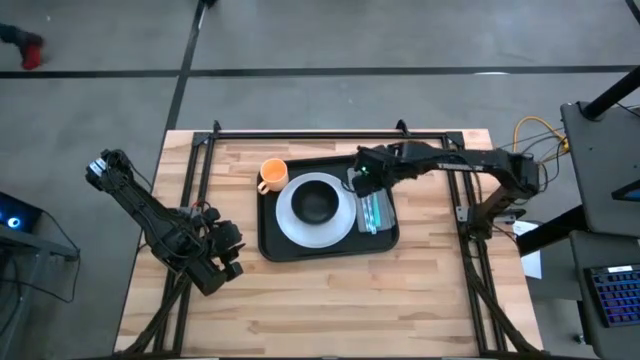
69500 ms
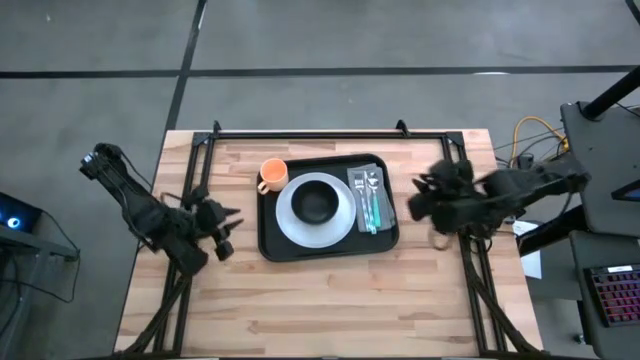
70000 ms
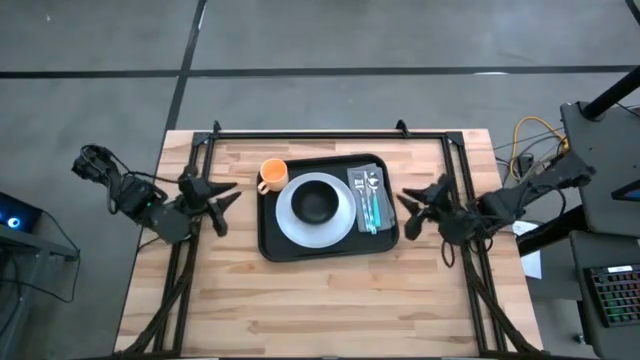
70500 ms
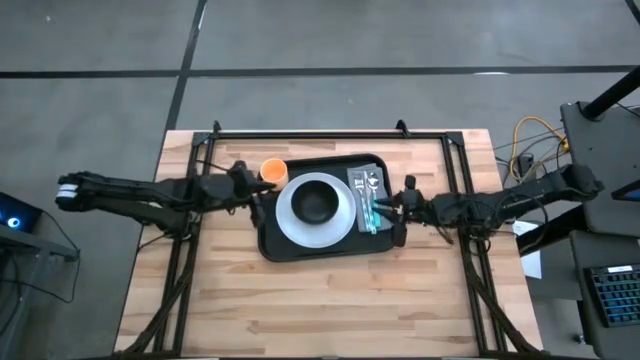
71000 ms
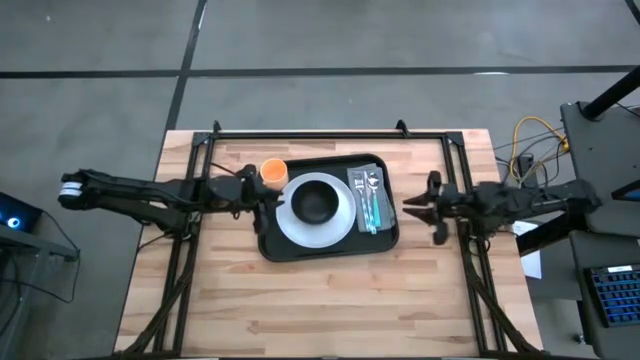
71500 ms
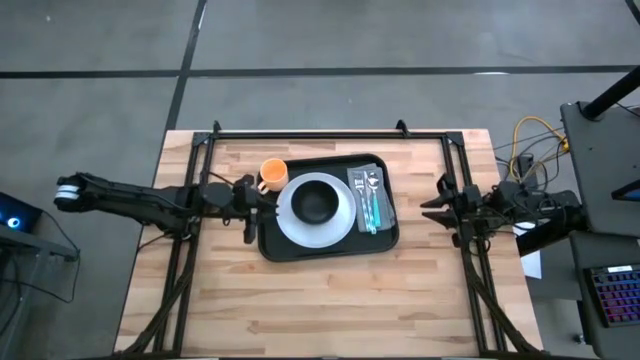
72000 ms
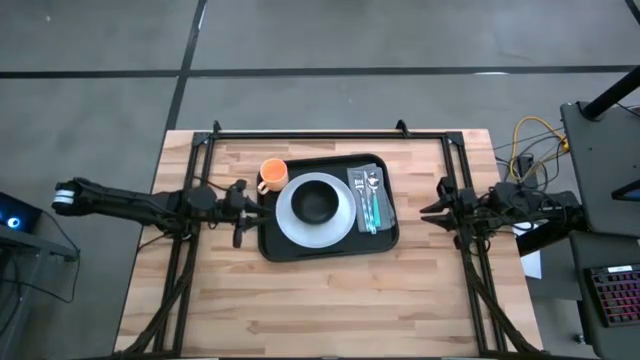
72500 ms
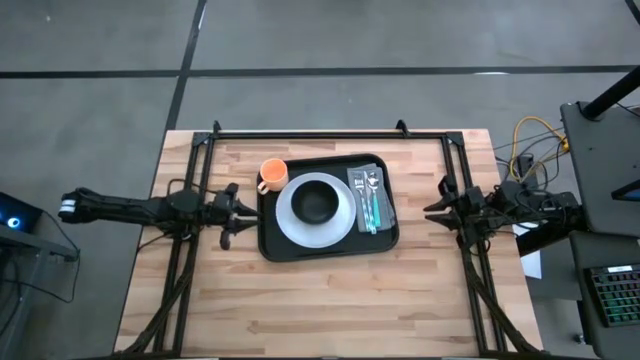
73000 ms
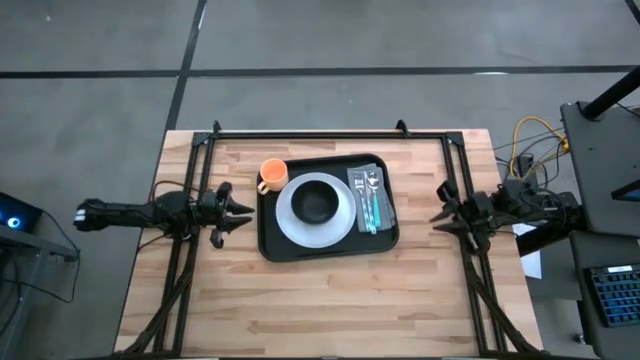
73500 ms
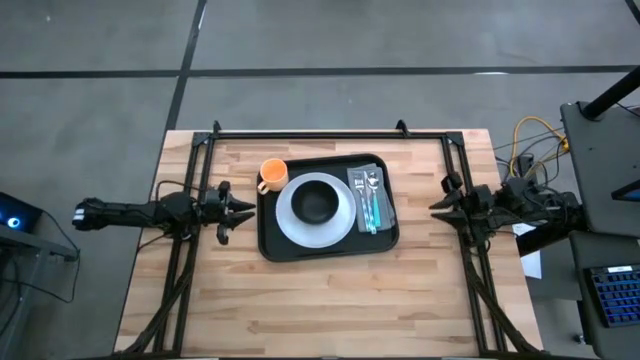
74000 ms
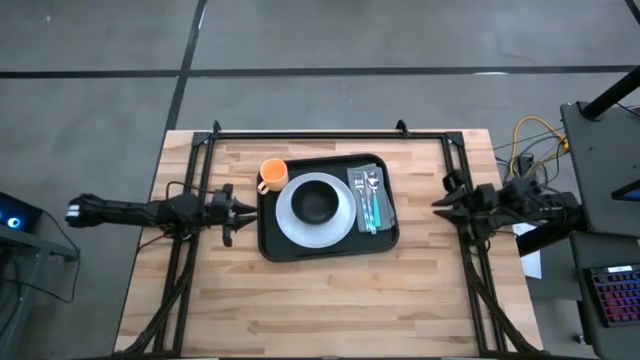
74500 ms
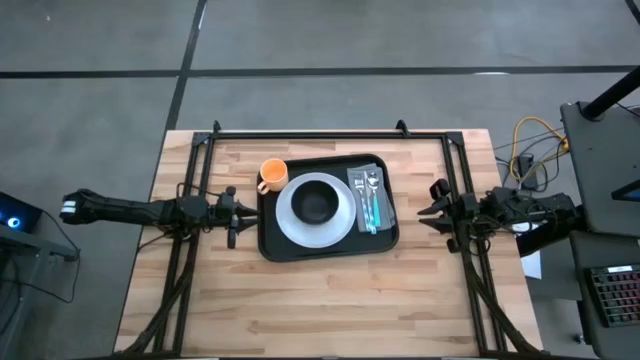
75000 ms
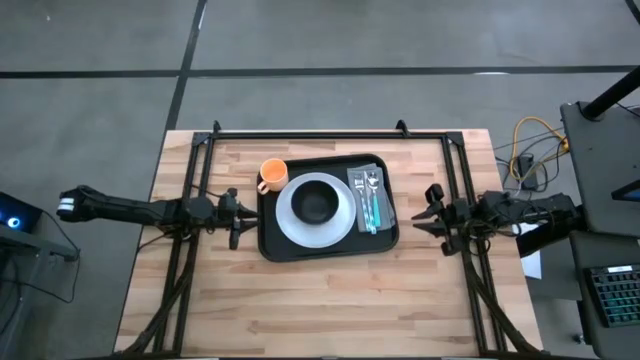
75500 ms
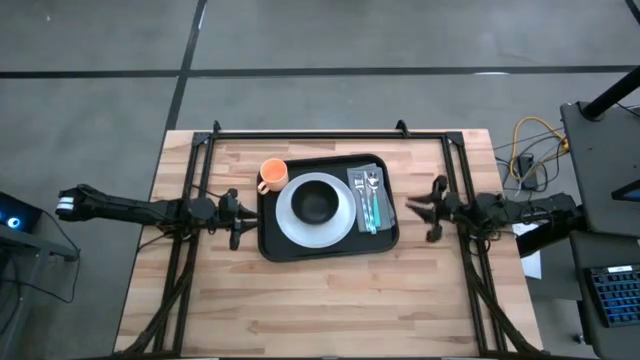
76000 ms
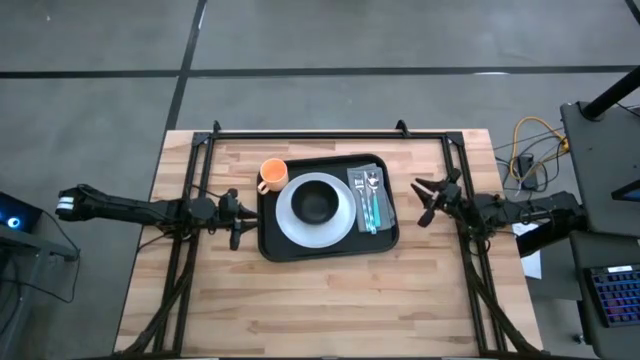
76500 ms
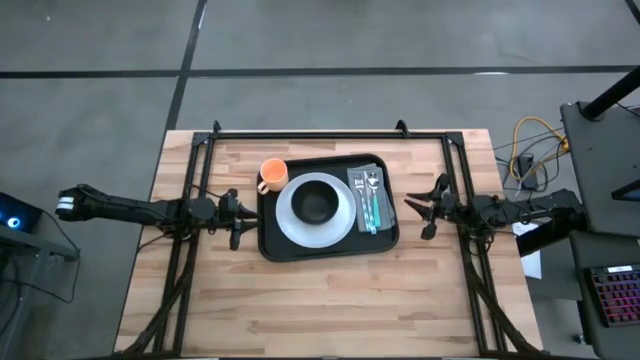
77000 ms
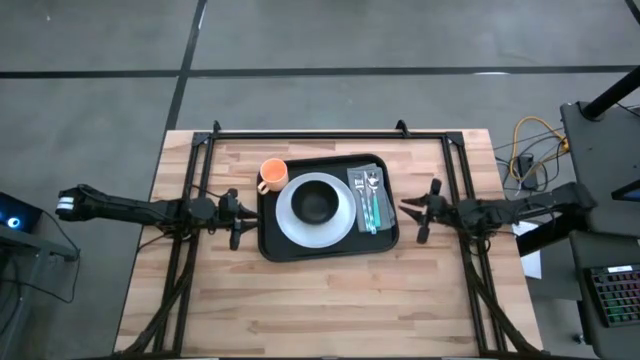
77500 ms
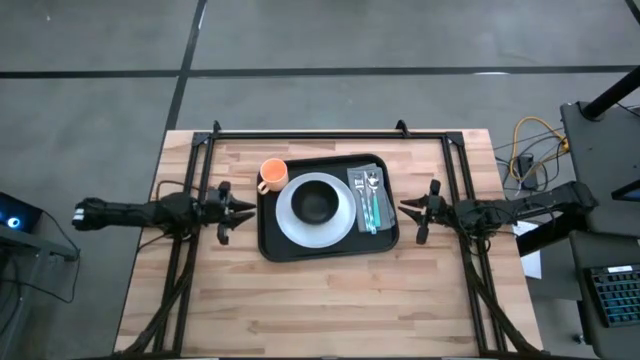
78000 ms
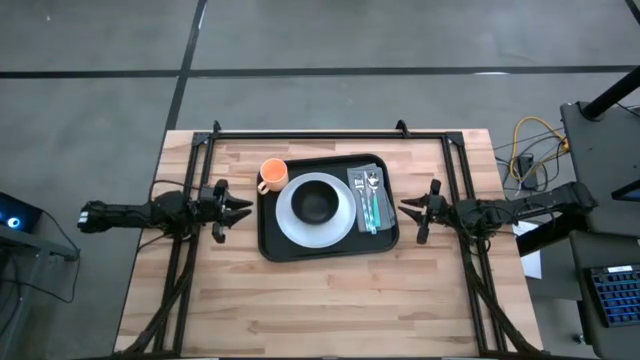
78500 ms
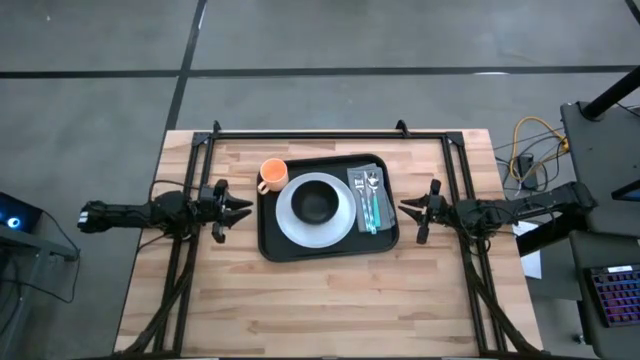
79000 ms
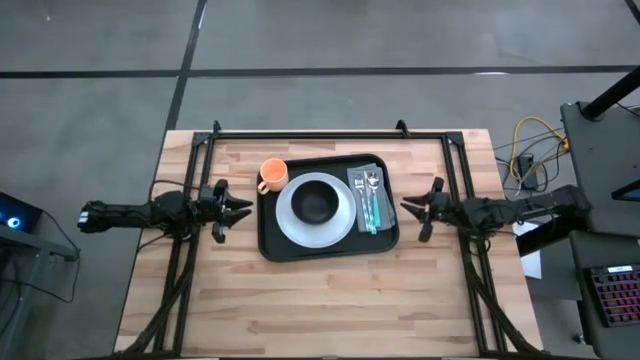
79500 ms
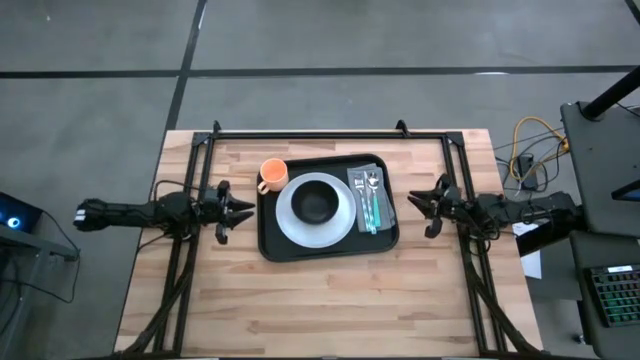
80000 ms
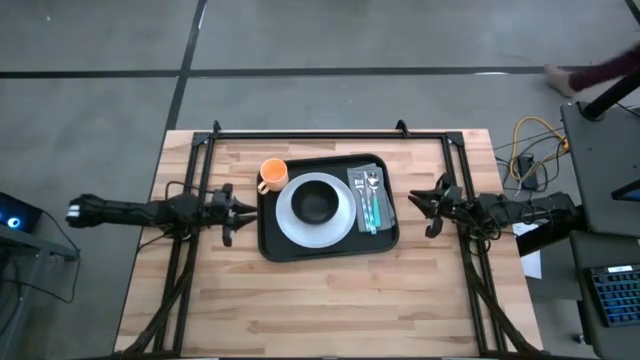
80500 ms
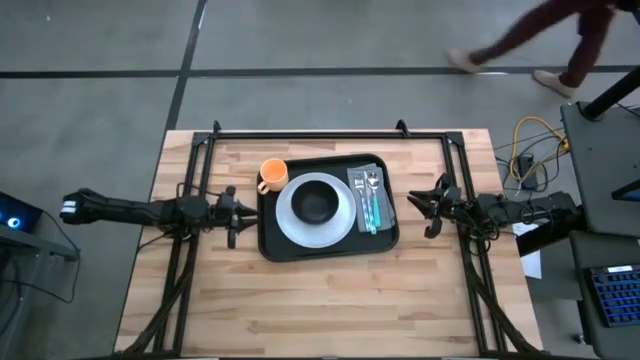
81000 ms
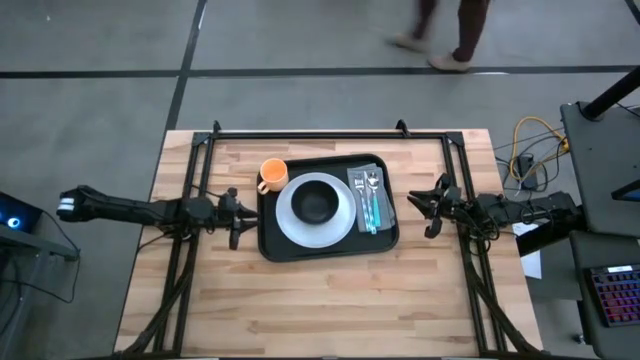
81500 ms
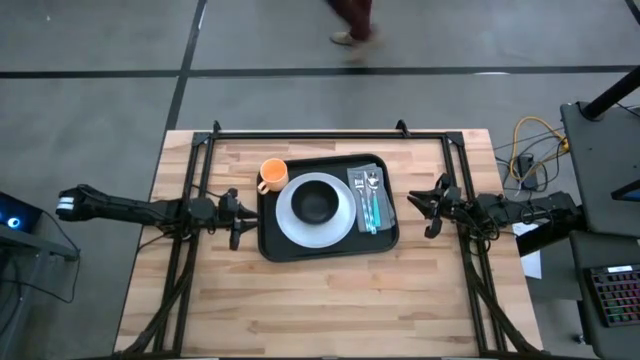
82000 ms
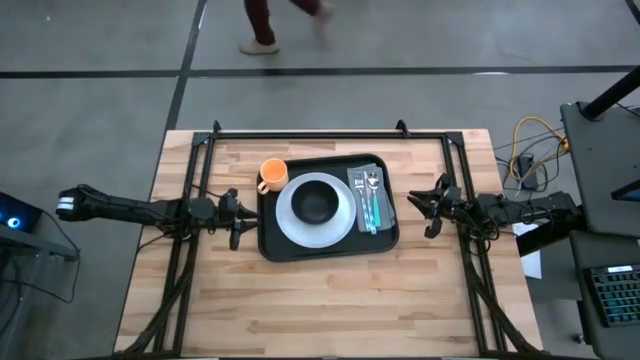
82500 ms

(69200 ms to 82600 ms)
Task: Set up tray
Return to Home Position

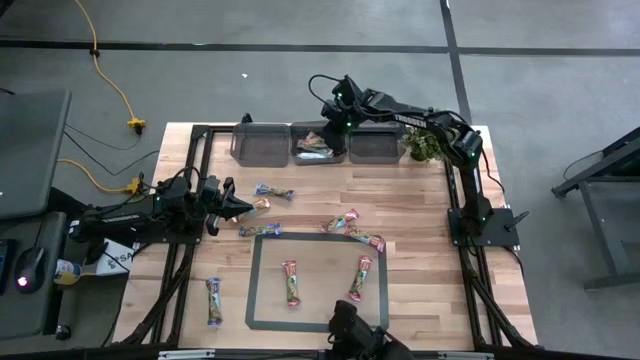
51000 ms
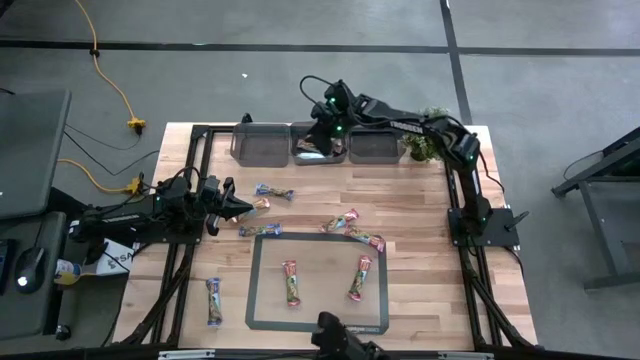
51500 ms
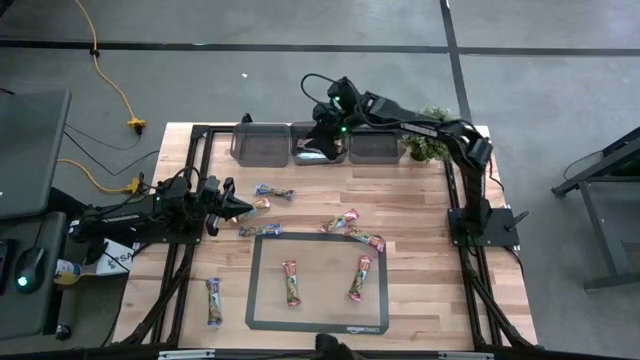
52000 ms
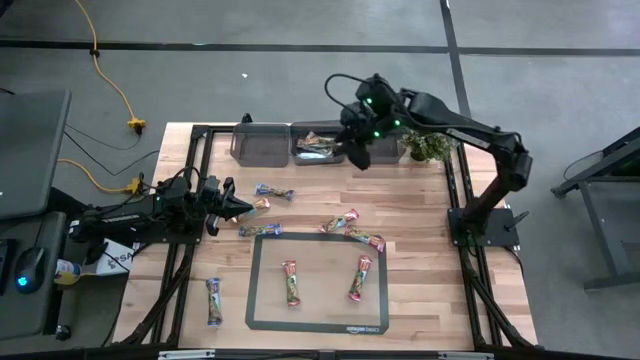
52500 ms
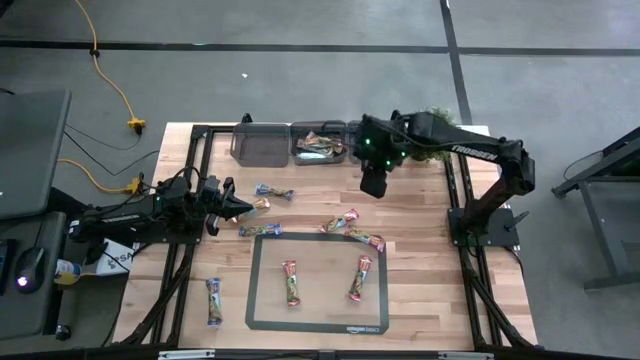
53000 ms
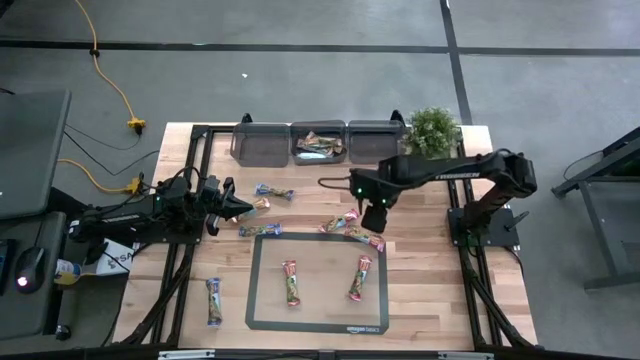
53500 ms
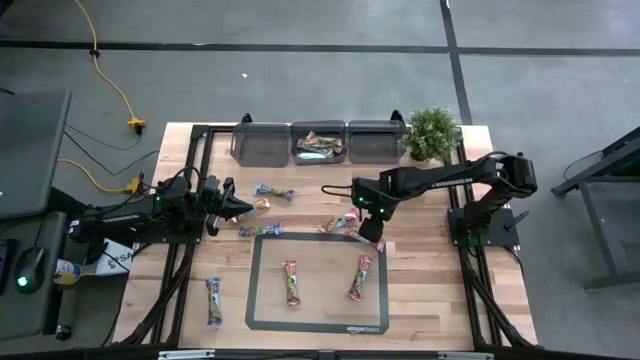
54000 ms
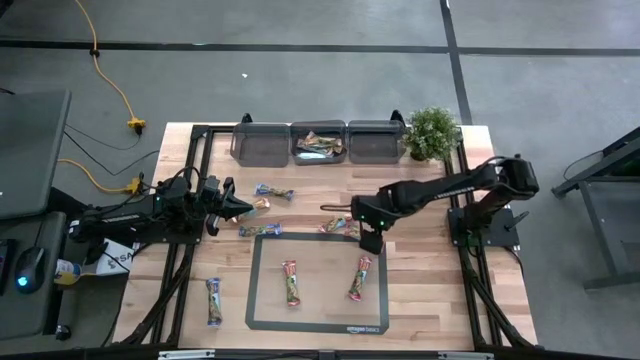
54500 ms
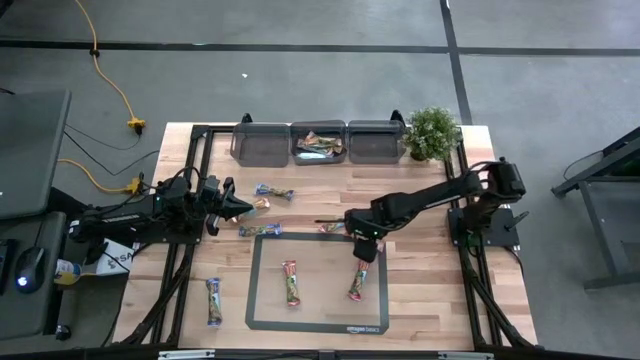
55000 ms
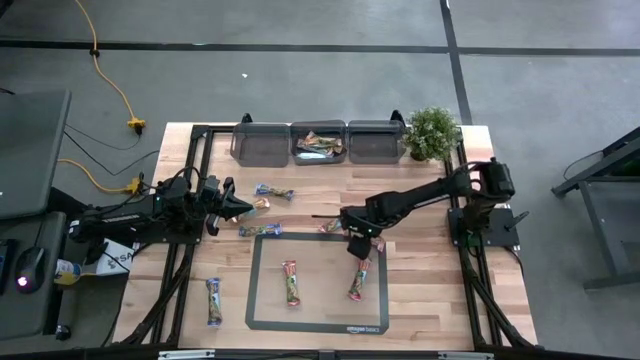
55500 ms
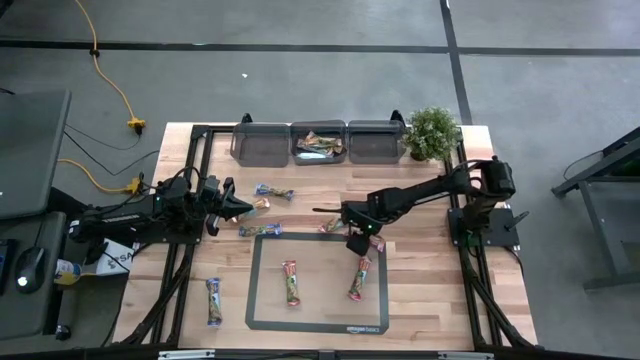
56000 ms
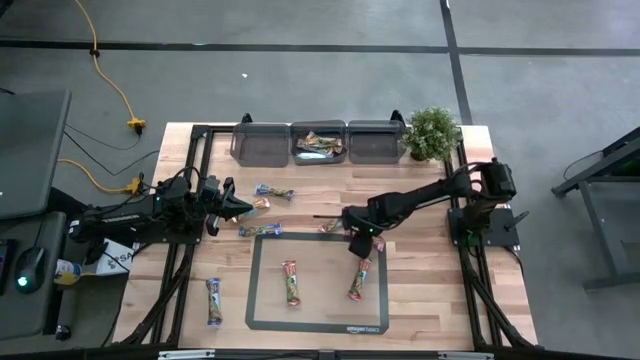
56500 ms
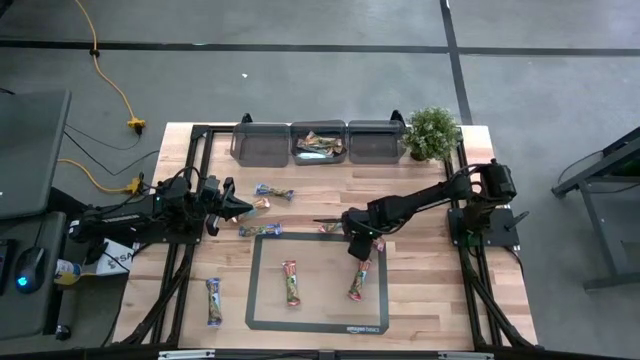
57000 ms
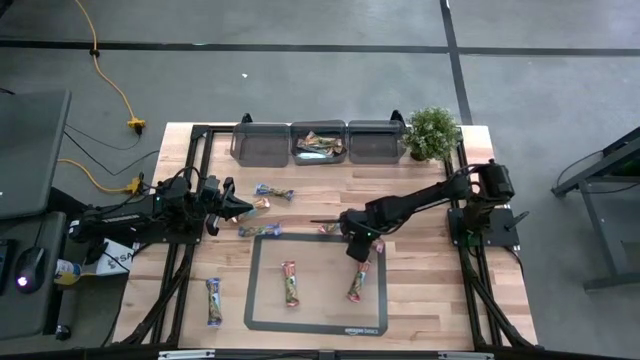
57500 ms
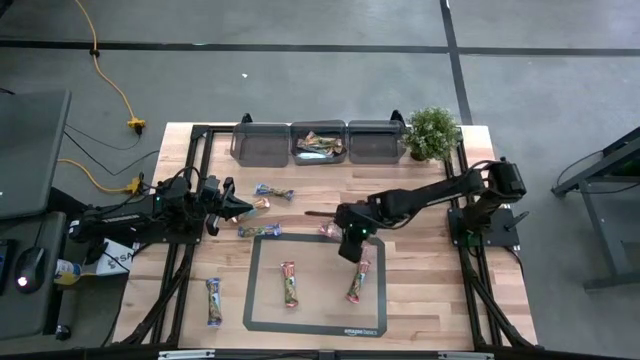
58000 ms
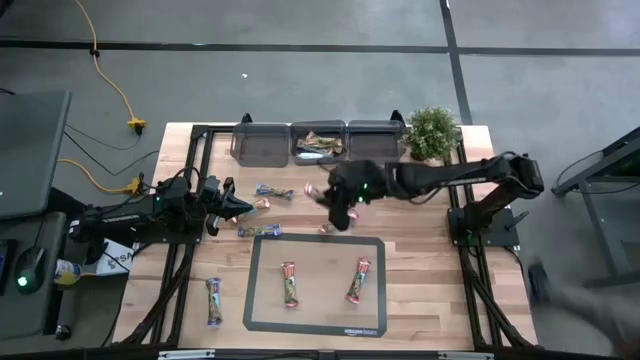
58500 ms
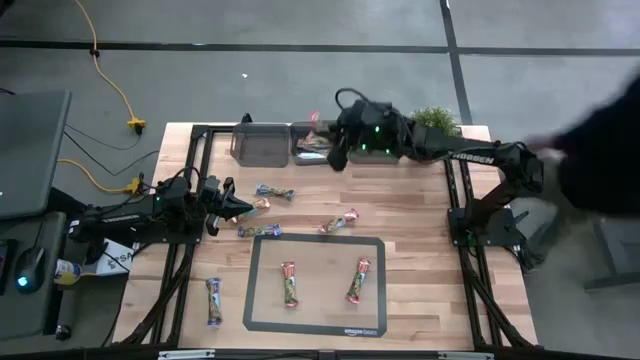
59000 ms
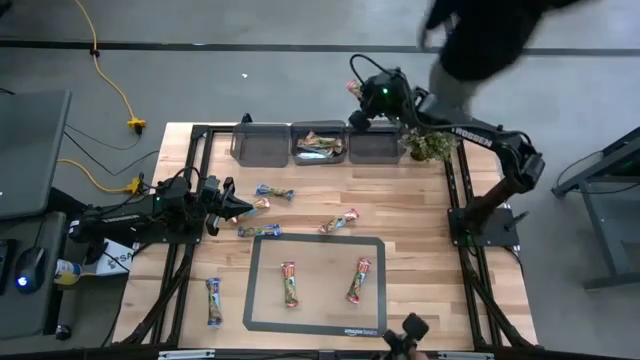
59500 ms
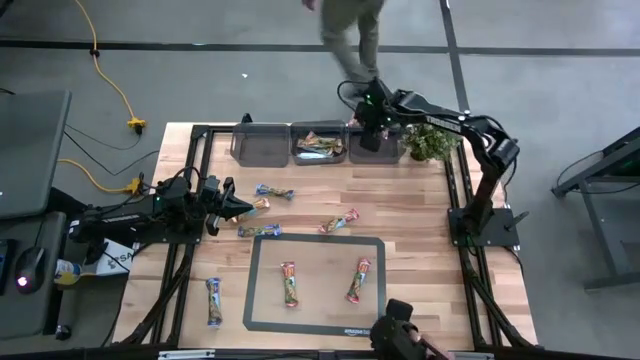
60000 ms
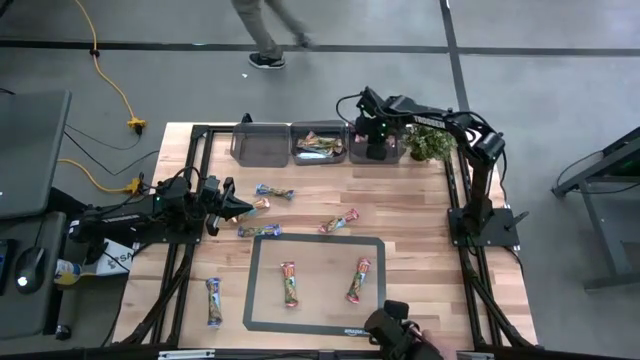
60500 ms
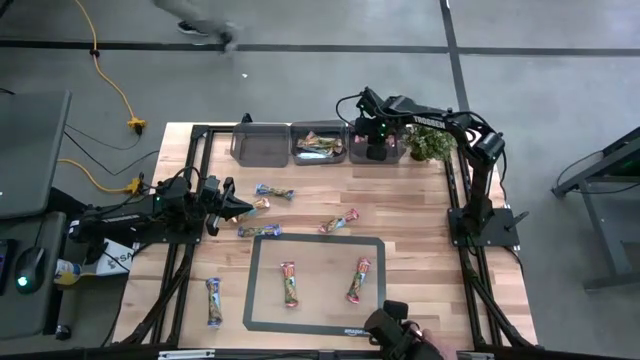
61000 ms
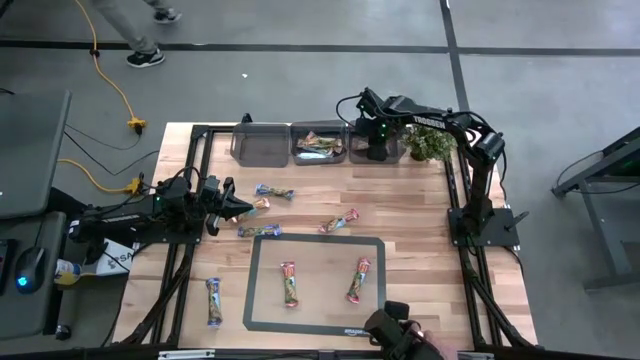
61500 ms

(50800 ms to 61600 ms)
Task: Pick and place Granola Bars by type
Put the red granola bar into the right black bin
